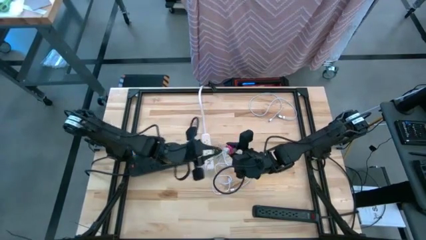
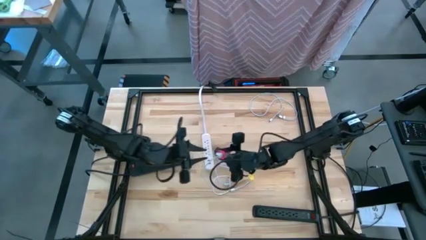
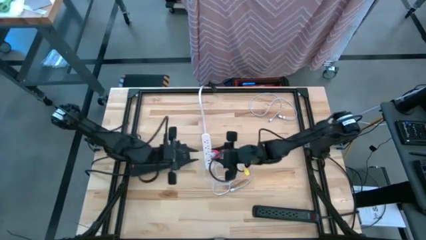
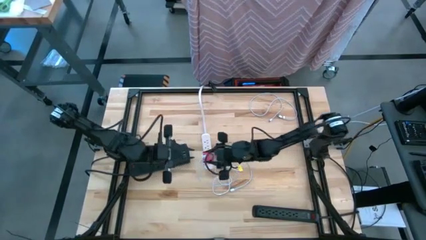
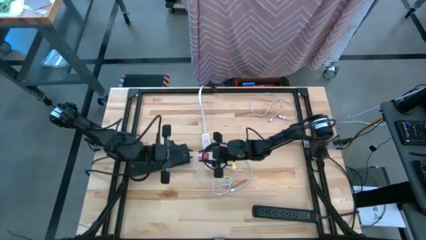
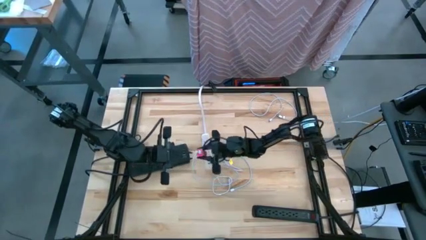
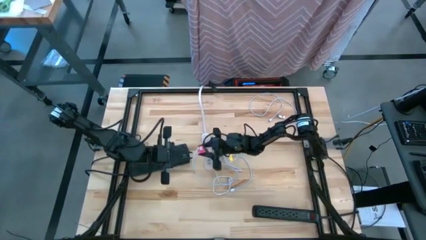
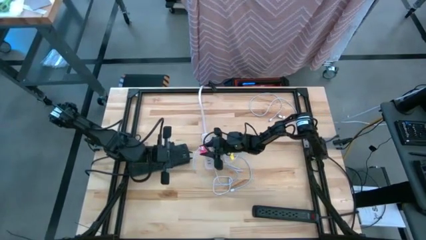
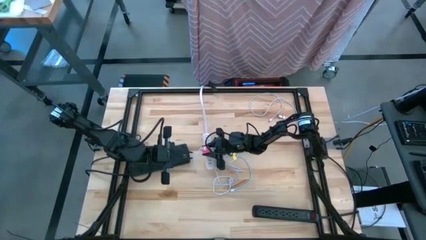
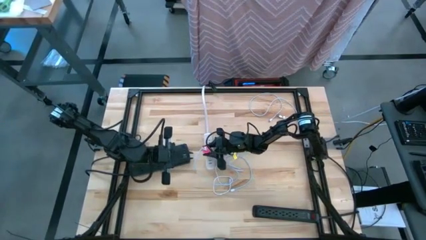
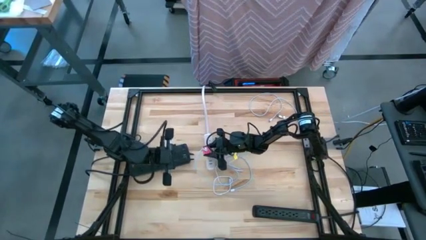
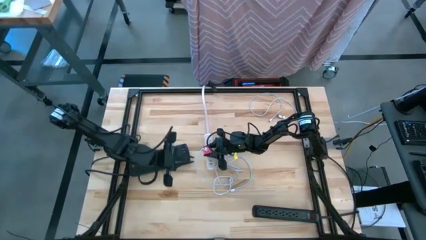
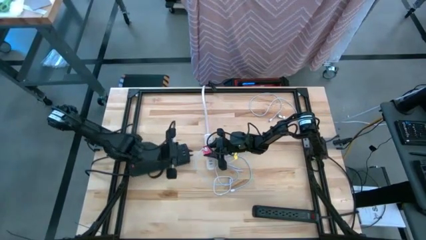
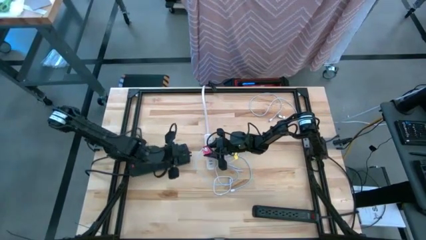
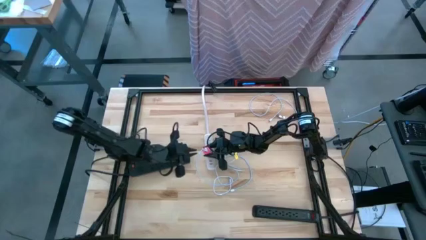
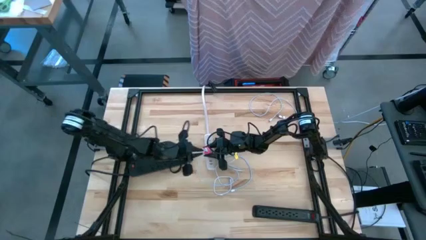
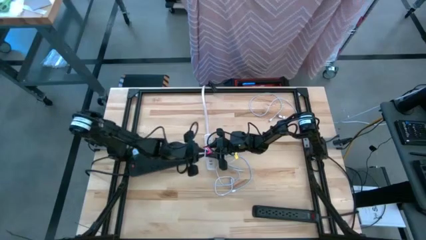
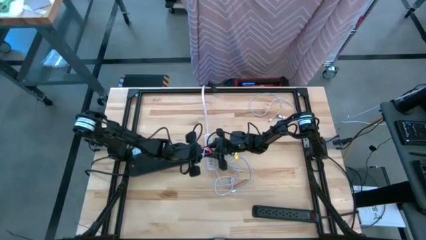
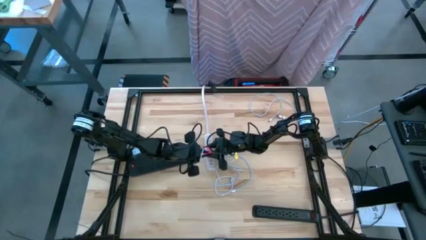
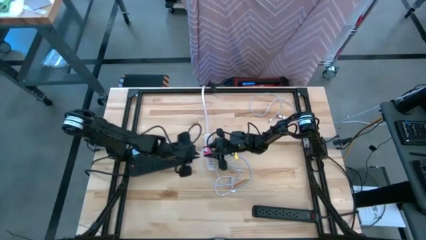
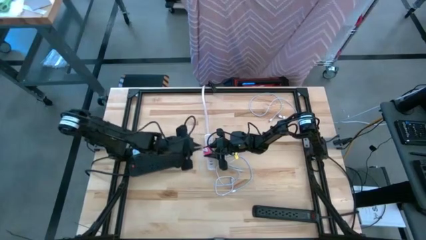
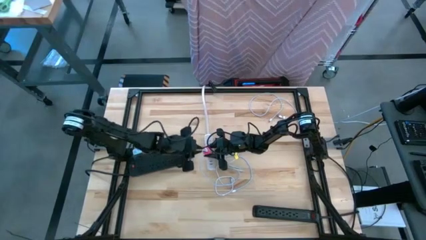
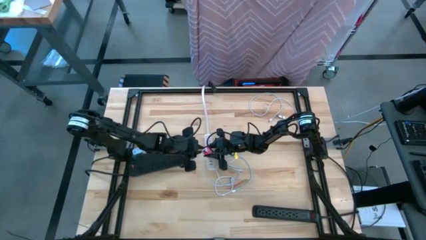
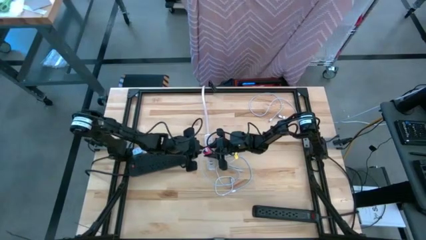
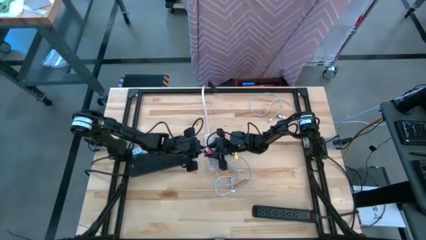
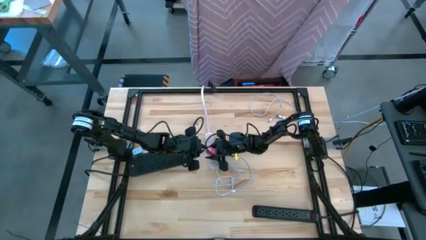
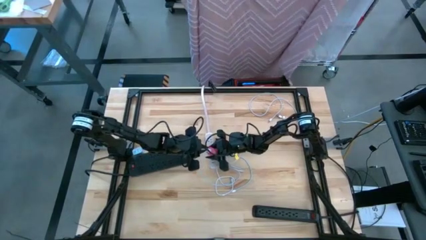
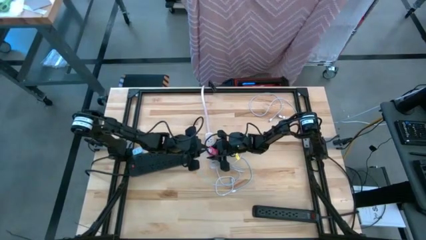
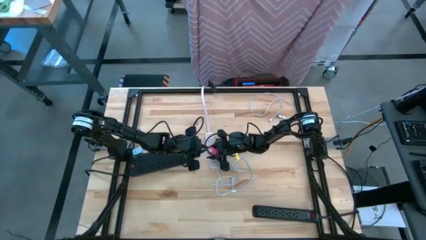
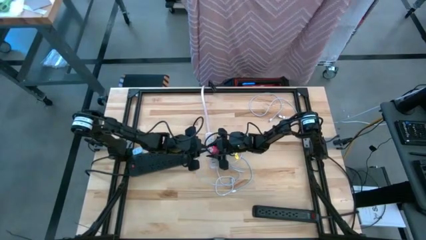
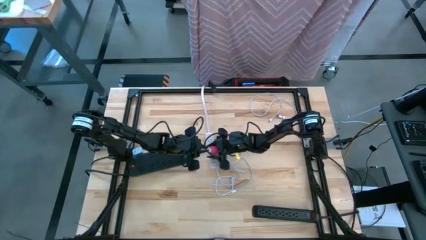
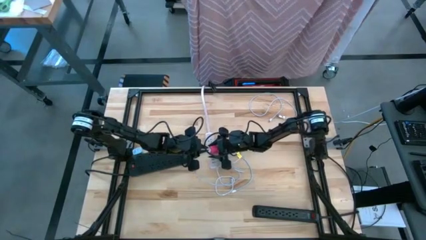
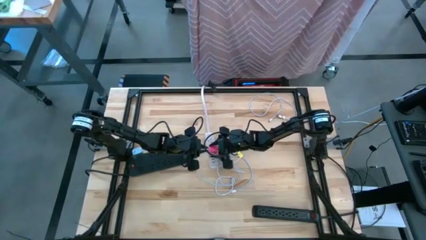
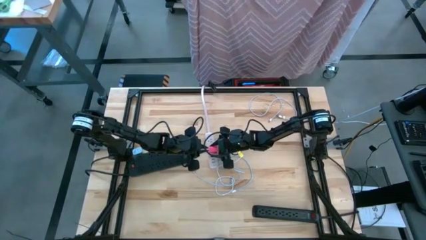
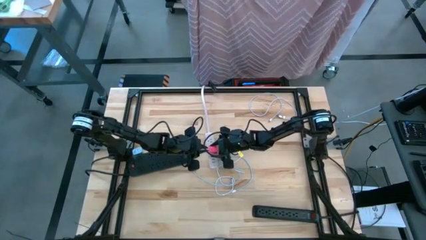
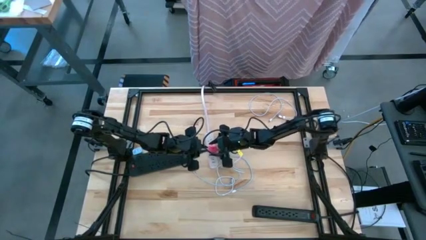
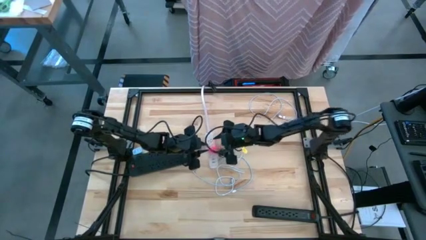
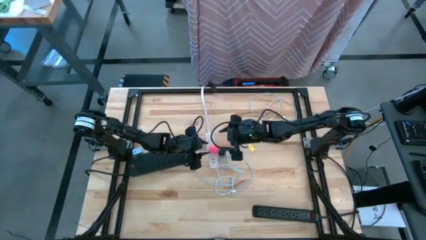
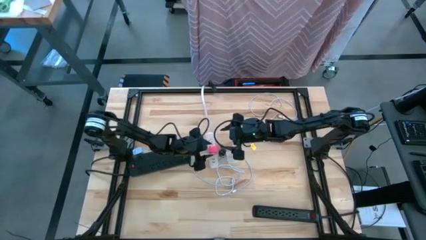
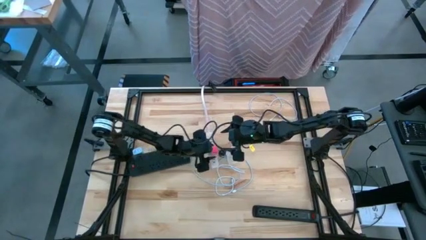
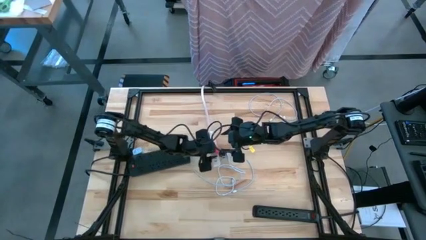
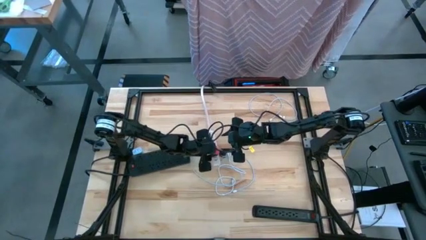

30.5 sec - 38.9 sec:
Task: Insert USB
Insert the pink charger adapter into the white outlet extension

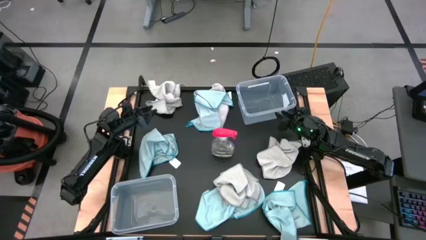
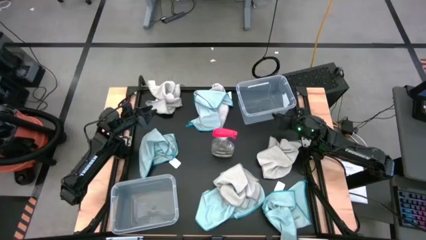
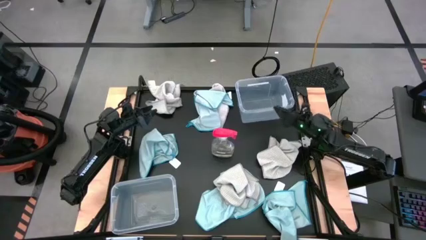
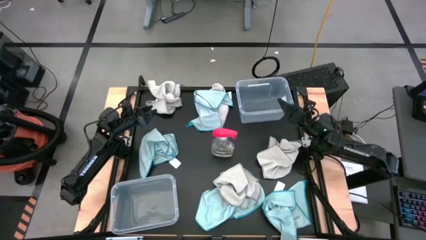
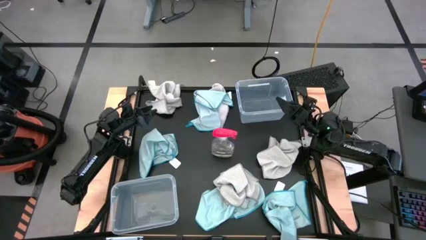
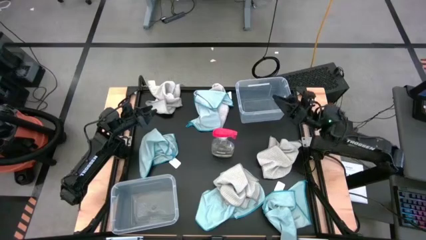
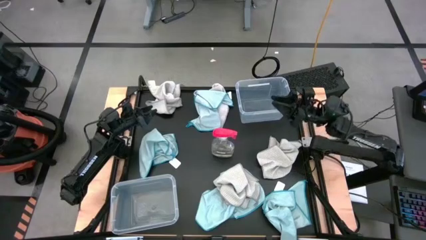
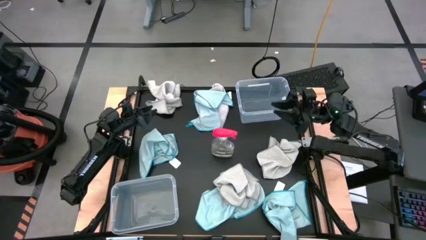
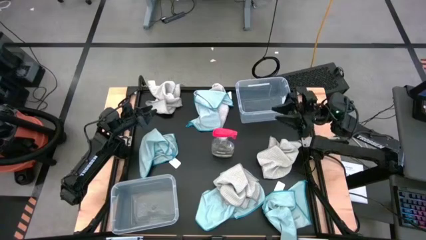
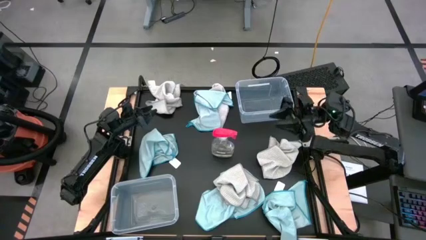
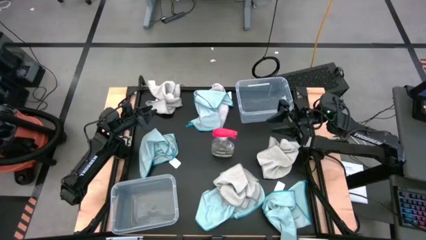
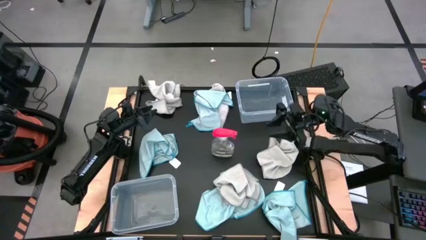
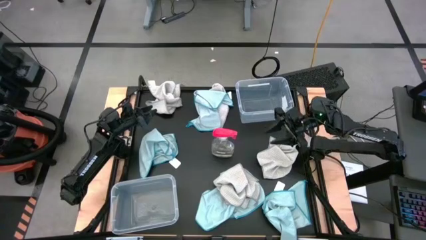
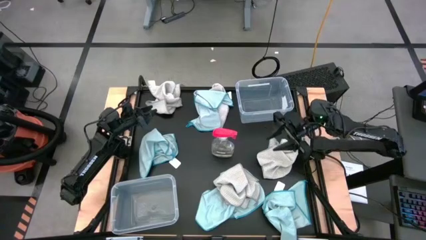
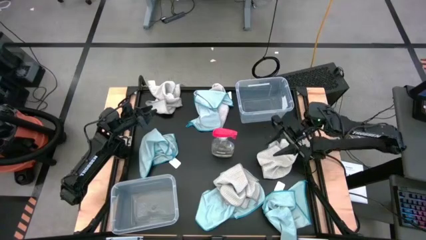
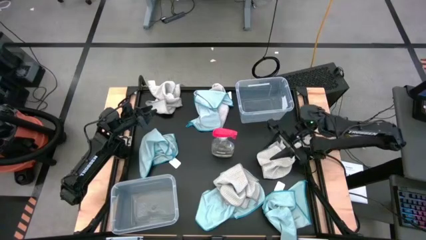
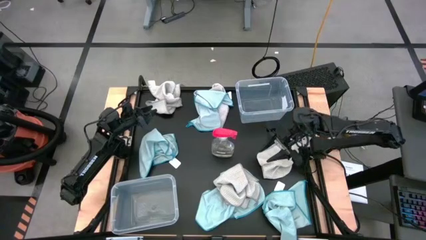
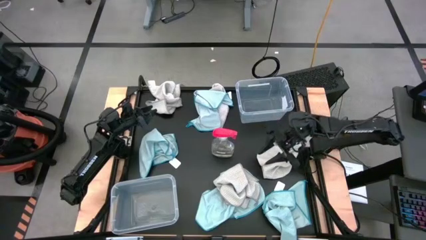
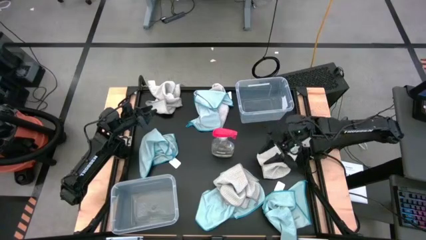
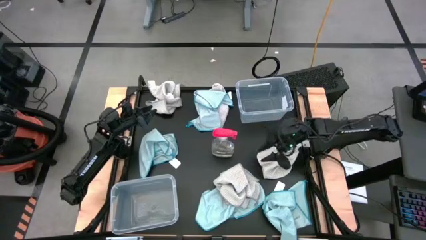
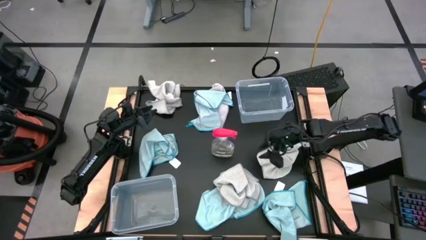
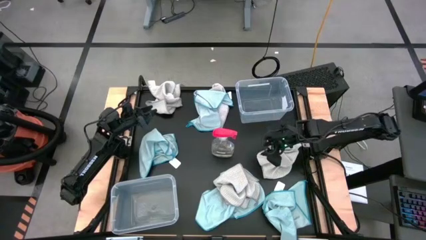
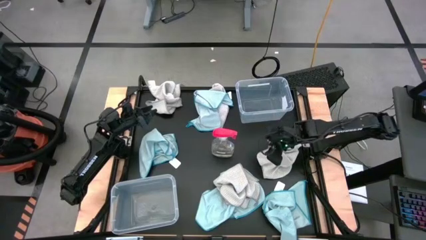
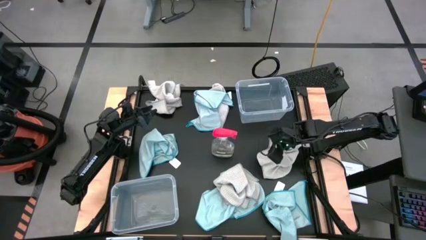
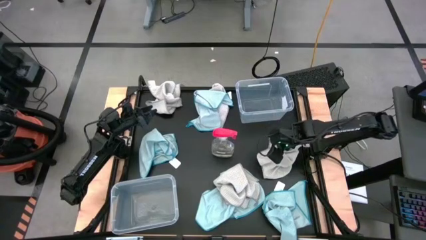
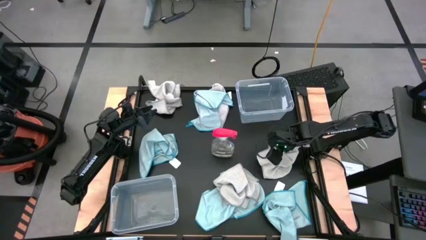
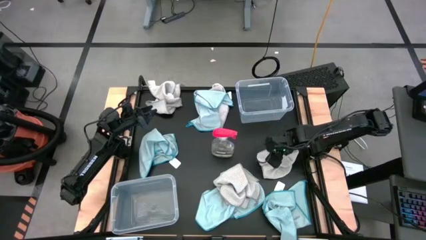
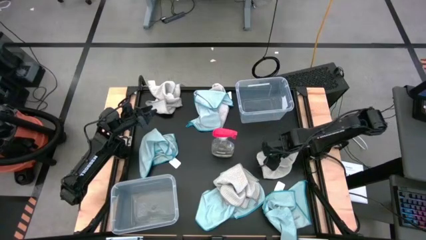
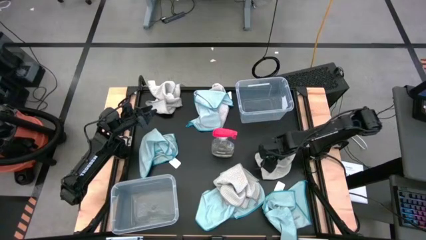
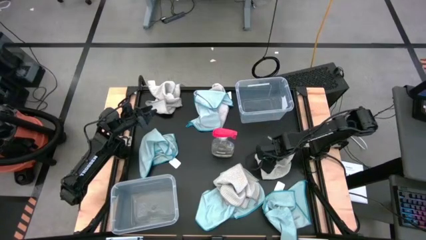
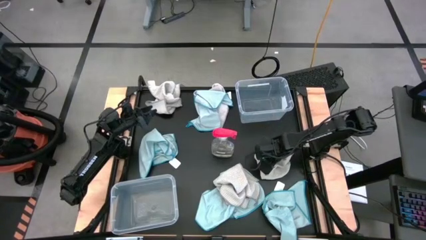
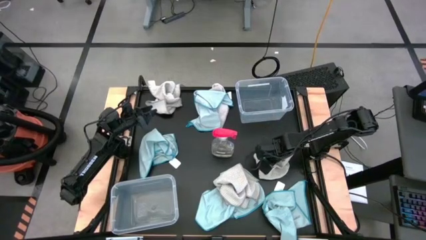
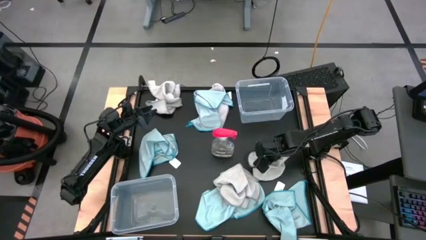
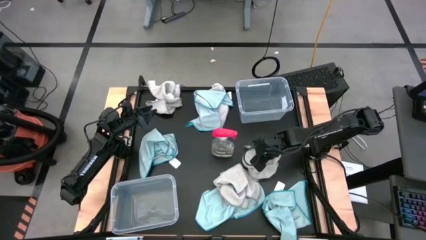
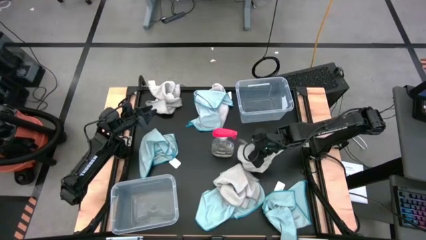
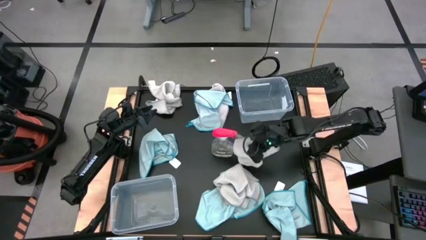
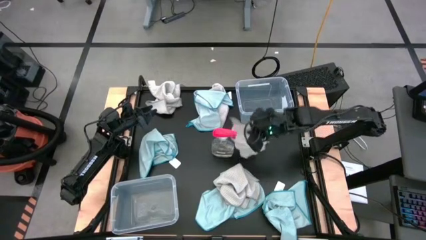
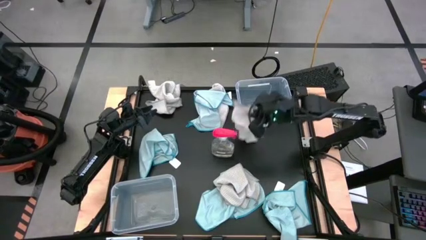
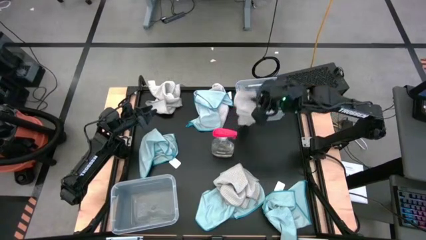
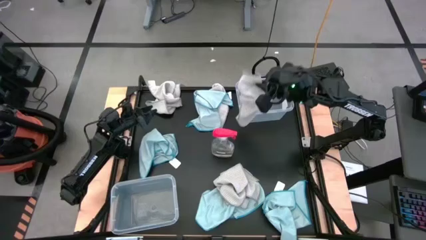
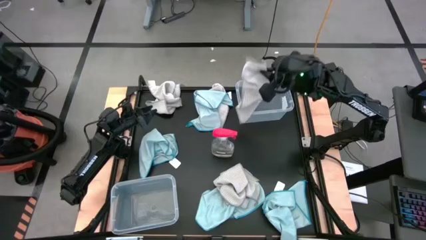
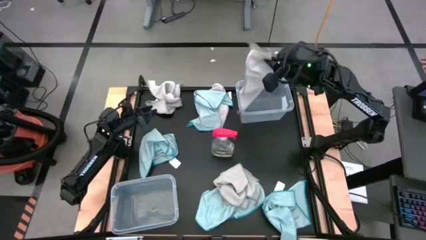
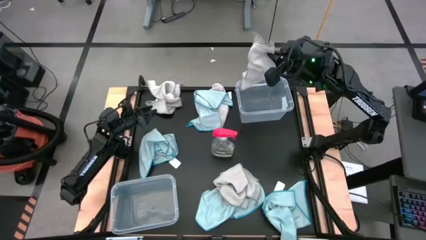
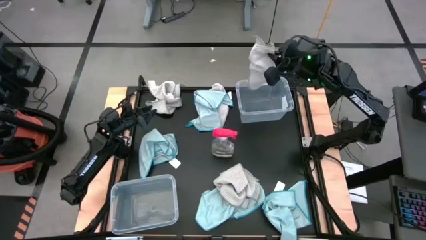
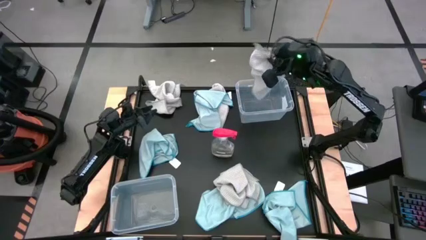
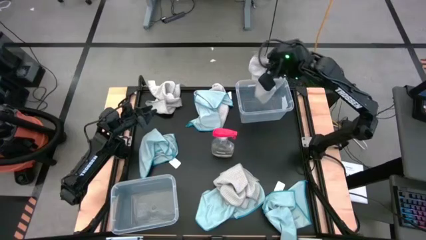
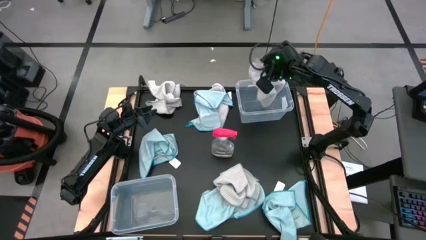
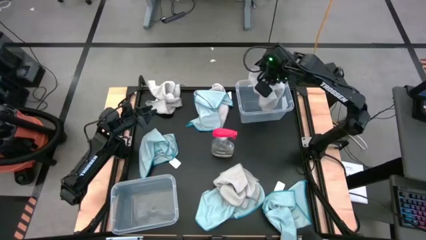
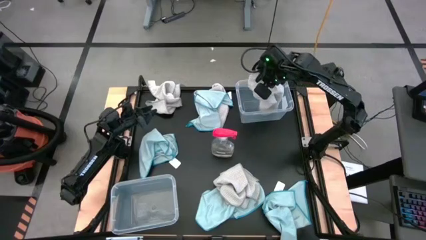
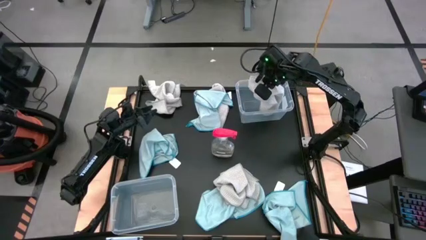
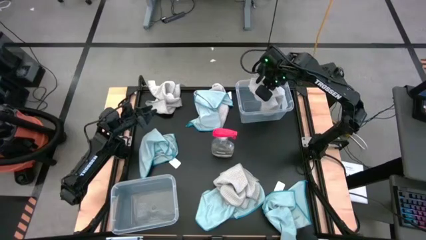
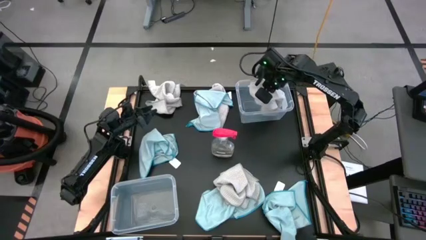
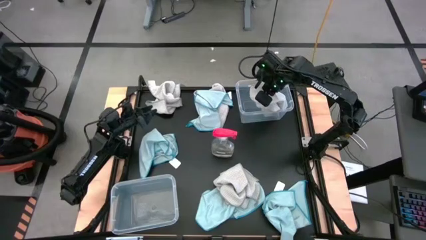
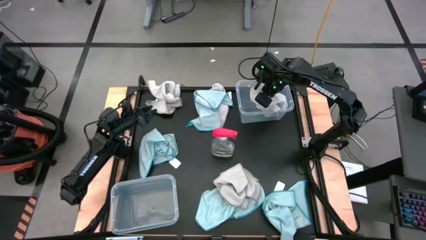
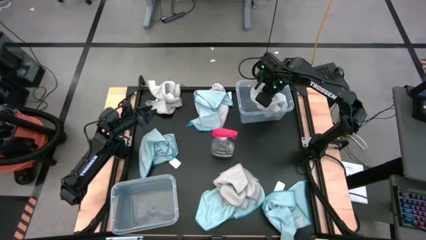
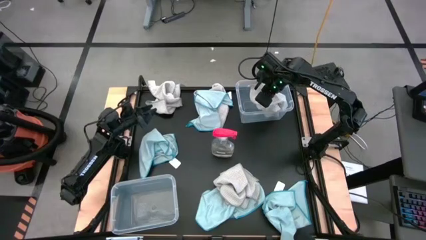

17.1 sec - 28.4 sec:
Task: Sort microfiber towel by color & place in baskets
Put the gray towel into the top transparent bin
